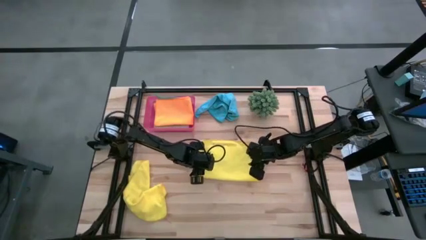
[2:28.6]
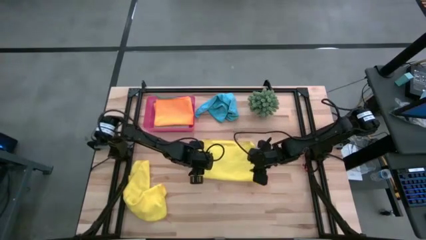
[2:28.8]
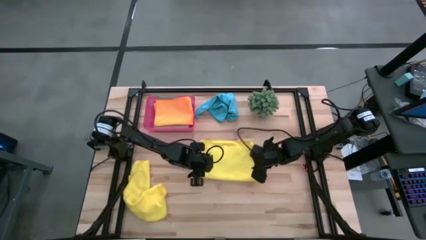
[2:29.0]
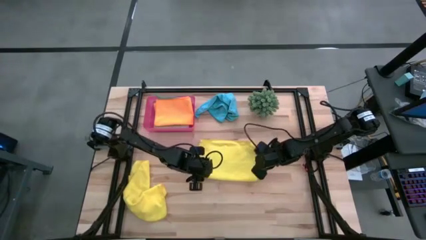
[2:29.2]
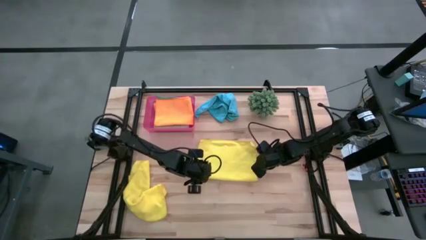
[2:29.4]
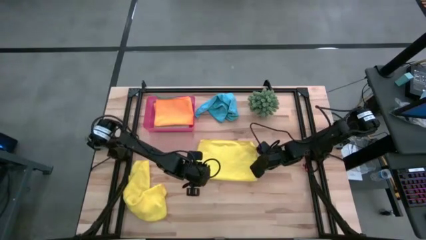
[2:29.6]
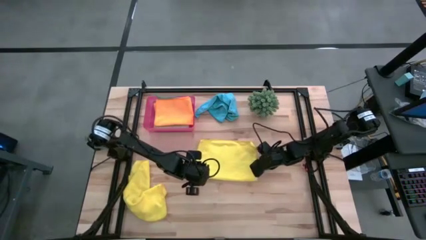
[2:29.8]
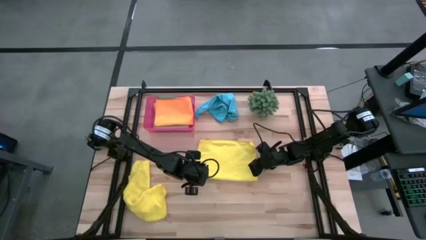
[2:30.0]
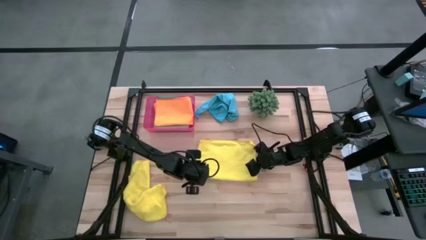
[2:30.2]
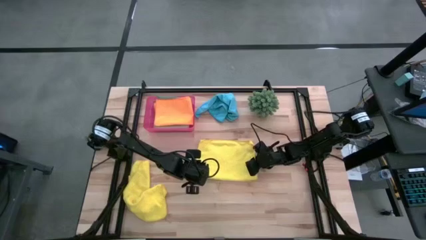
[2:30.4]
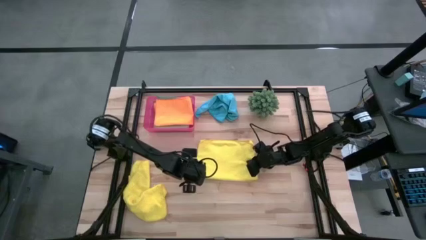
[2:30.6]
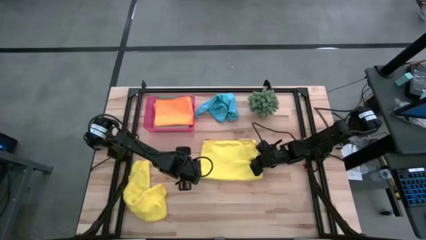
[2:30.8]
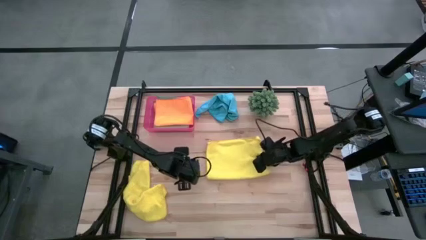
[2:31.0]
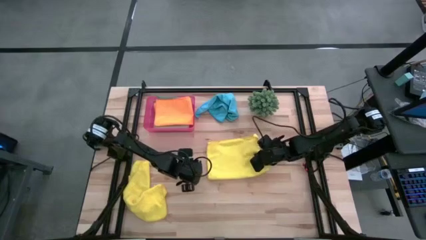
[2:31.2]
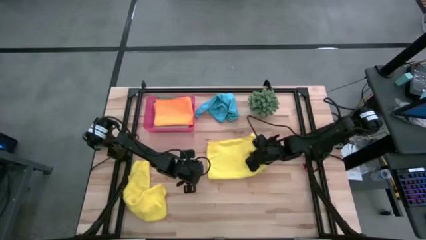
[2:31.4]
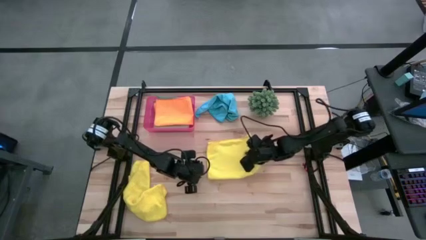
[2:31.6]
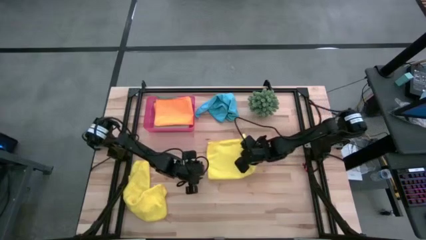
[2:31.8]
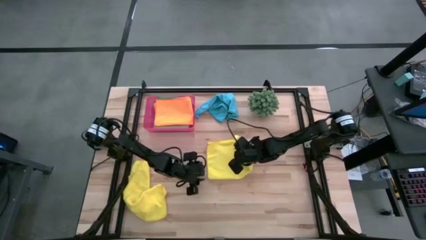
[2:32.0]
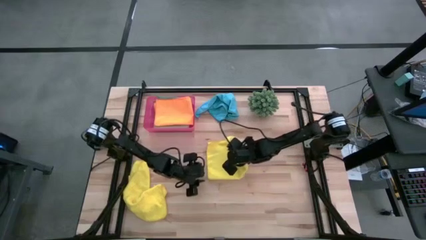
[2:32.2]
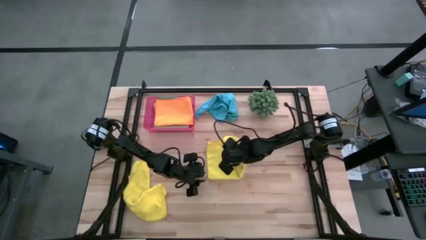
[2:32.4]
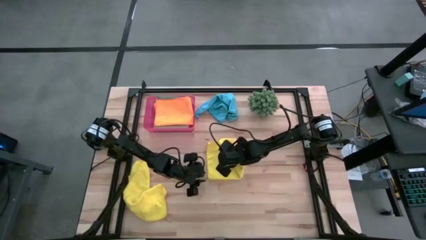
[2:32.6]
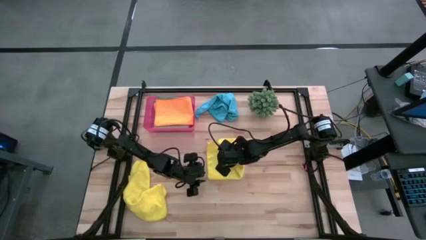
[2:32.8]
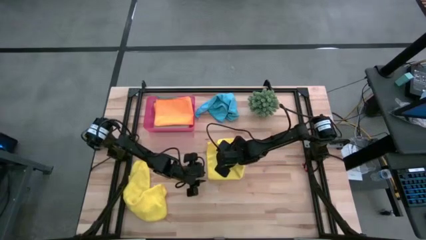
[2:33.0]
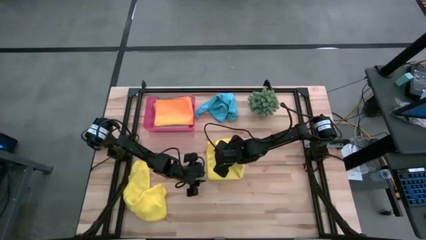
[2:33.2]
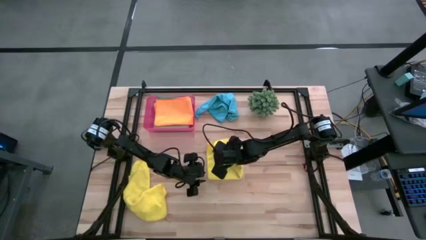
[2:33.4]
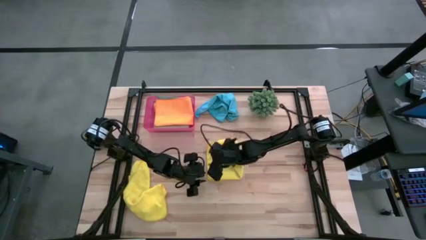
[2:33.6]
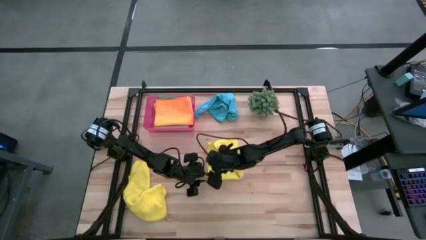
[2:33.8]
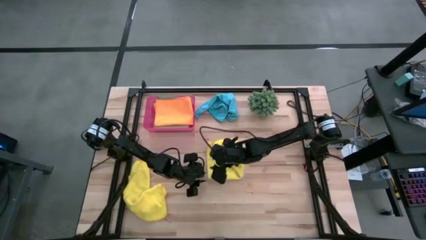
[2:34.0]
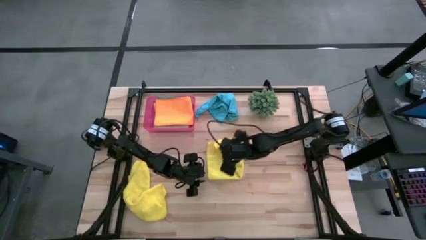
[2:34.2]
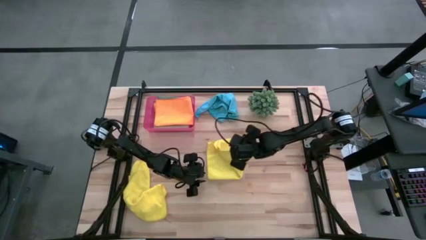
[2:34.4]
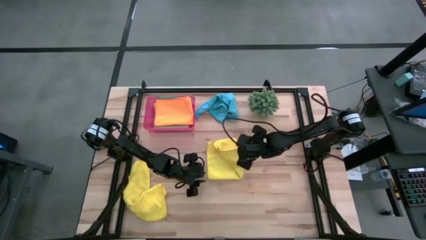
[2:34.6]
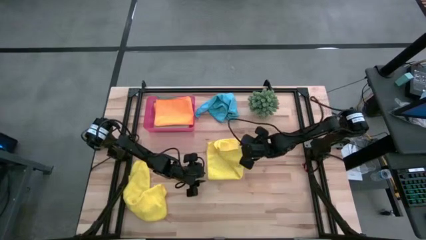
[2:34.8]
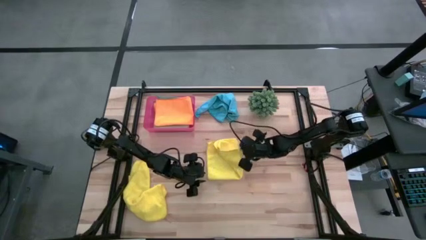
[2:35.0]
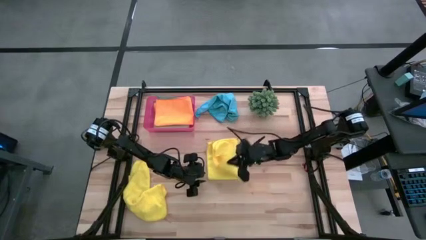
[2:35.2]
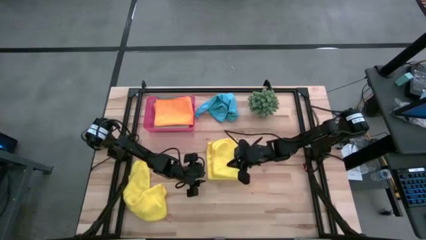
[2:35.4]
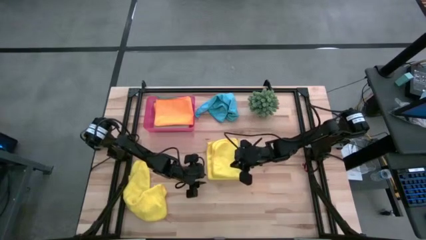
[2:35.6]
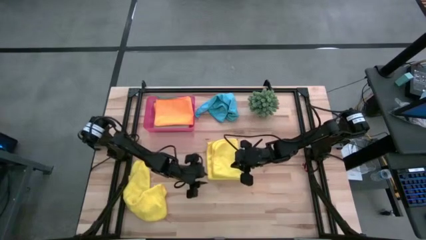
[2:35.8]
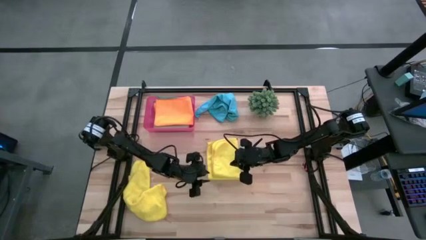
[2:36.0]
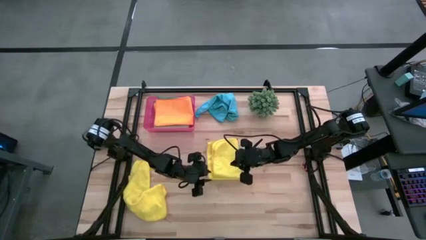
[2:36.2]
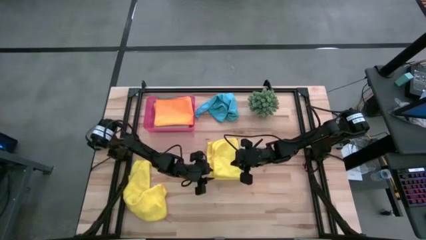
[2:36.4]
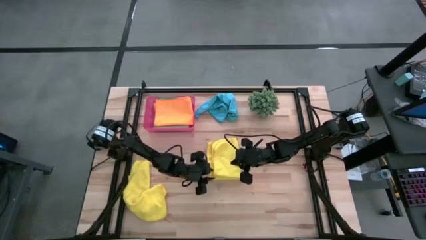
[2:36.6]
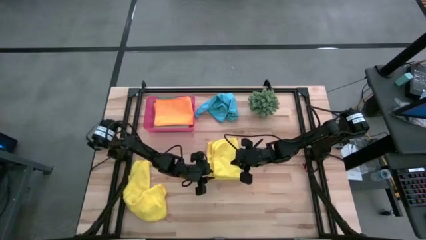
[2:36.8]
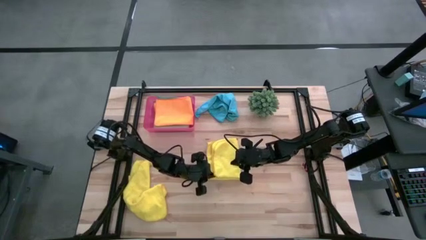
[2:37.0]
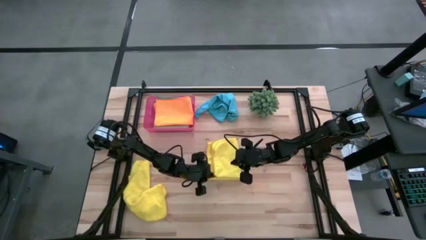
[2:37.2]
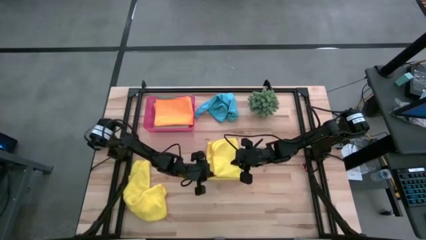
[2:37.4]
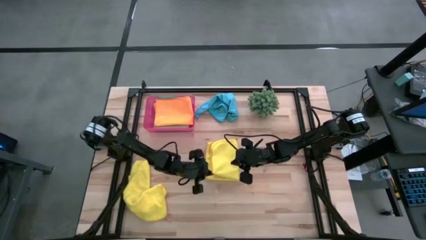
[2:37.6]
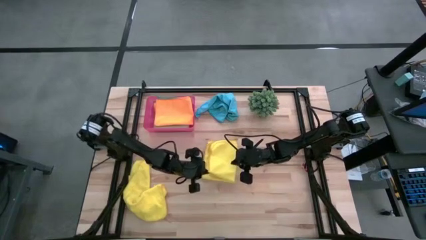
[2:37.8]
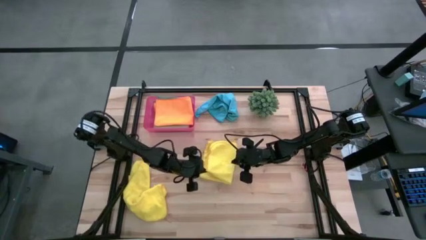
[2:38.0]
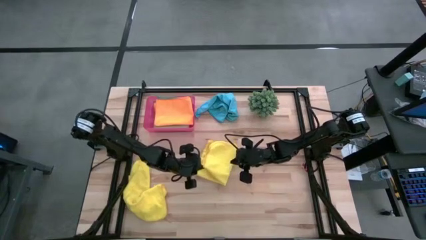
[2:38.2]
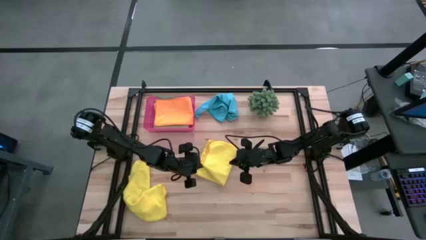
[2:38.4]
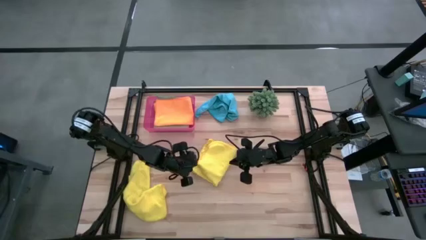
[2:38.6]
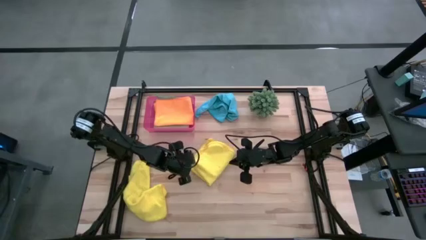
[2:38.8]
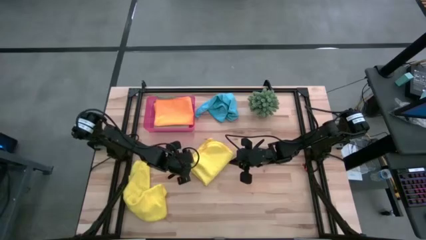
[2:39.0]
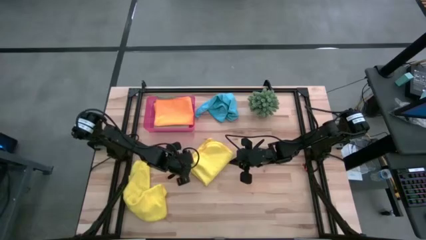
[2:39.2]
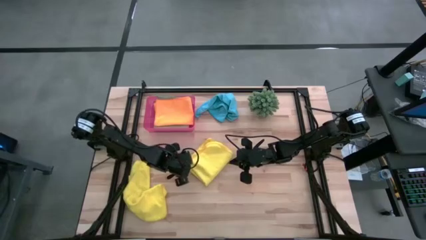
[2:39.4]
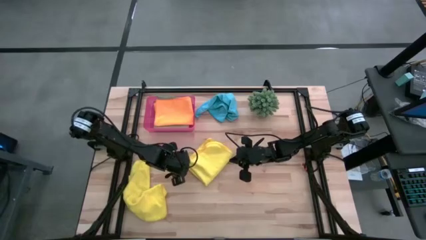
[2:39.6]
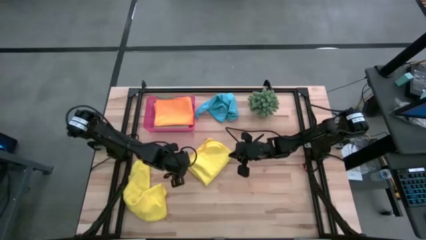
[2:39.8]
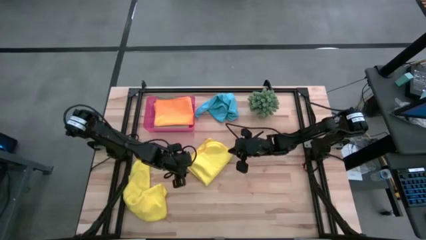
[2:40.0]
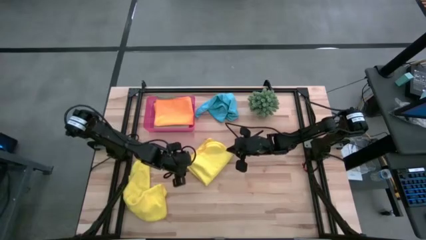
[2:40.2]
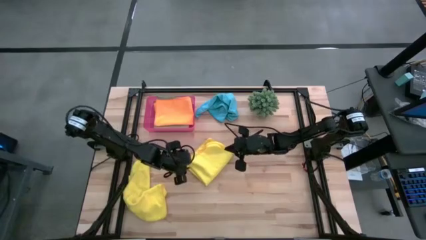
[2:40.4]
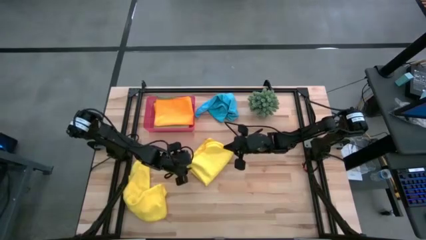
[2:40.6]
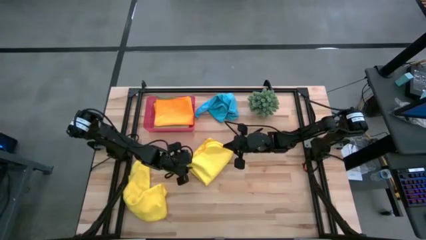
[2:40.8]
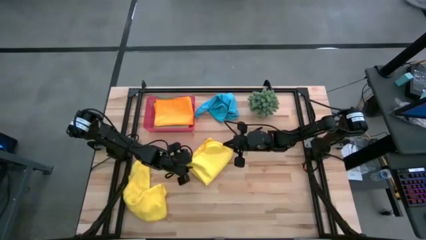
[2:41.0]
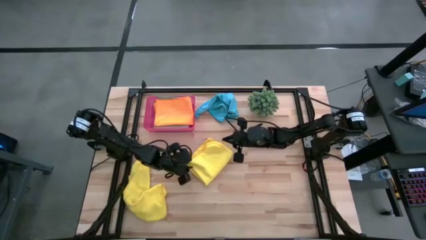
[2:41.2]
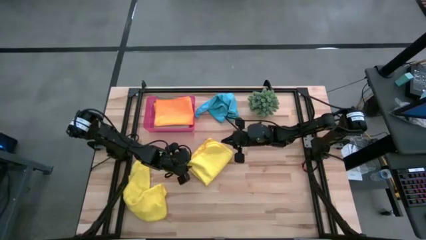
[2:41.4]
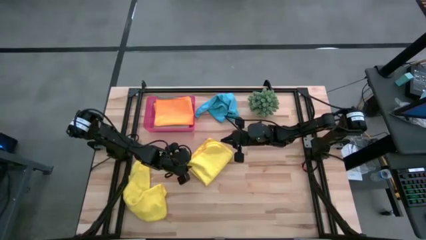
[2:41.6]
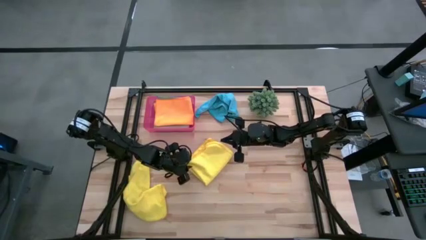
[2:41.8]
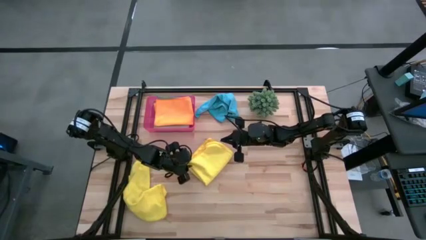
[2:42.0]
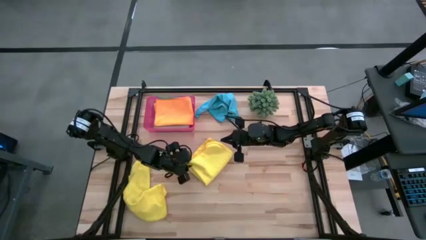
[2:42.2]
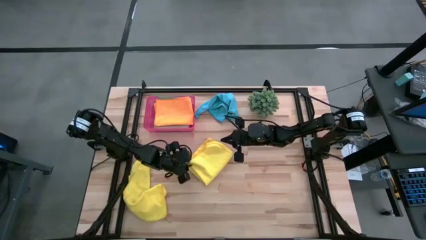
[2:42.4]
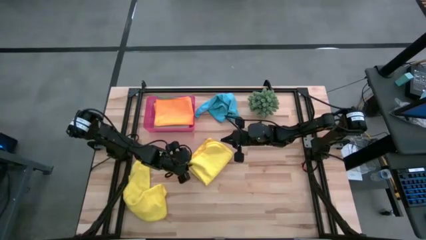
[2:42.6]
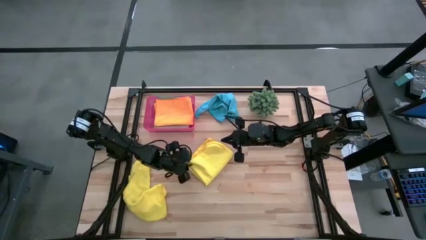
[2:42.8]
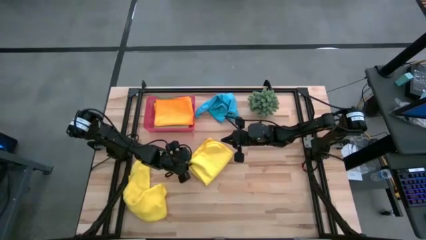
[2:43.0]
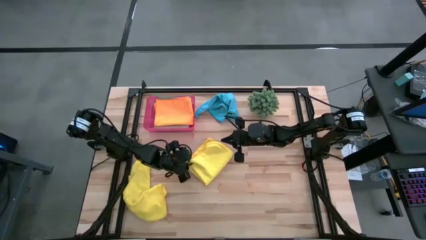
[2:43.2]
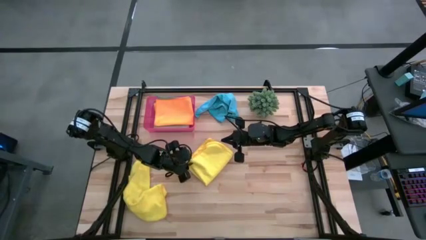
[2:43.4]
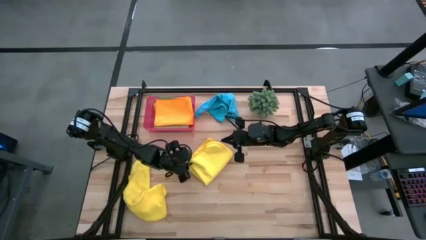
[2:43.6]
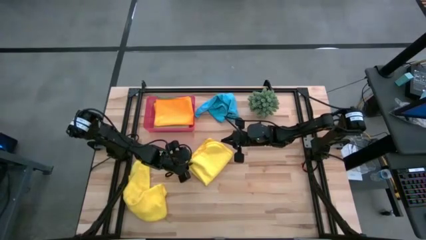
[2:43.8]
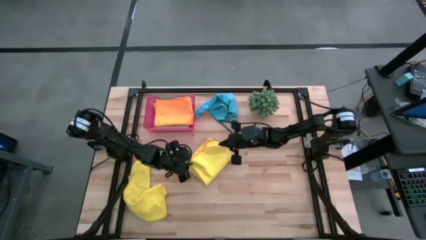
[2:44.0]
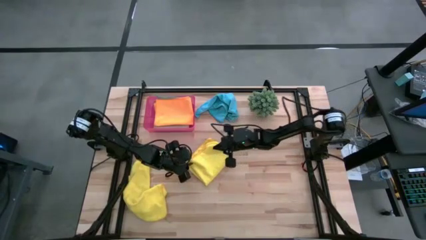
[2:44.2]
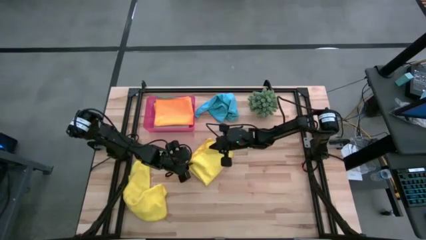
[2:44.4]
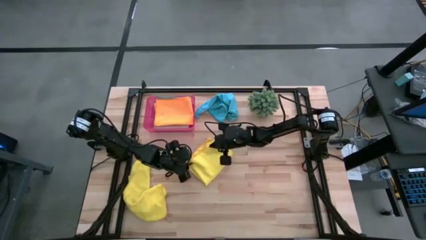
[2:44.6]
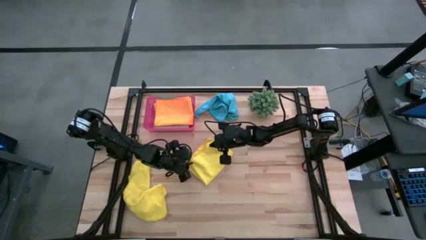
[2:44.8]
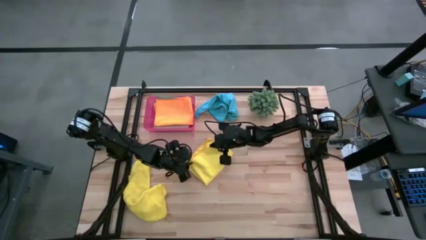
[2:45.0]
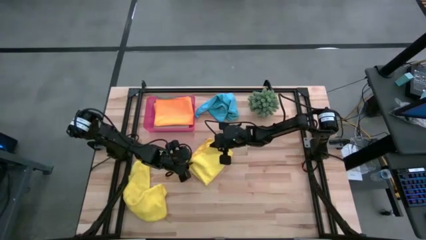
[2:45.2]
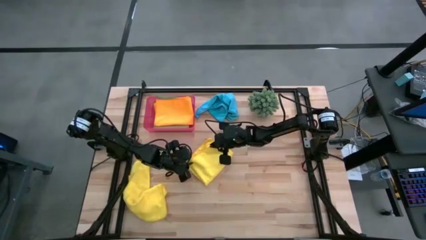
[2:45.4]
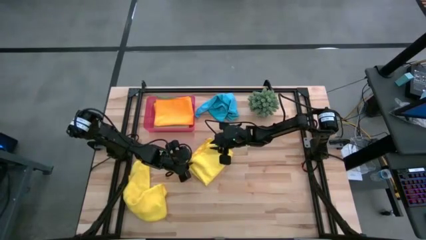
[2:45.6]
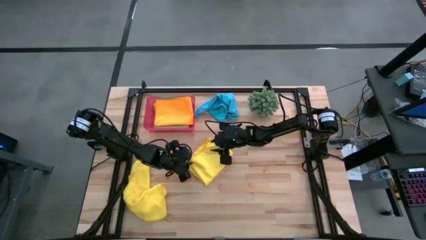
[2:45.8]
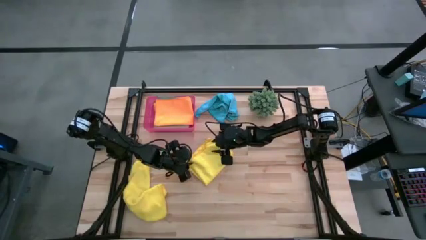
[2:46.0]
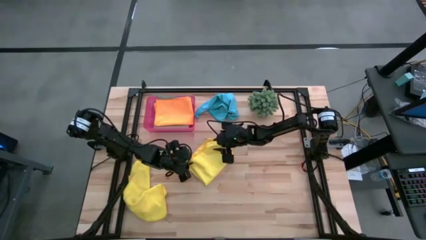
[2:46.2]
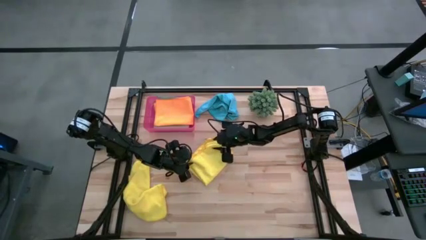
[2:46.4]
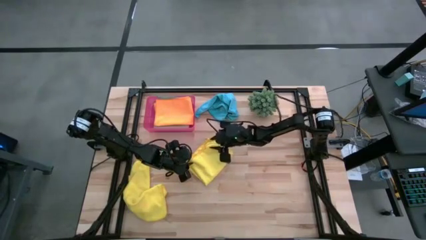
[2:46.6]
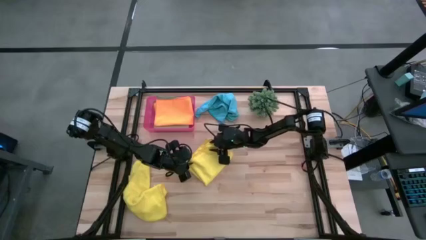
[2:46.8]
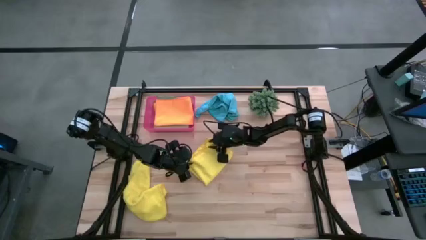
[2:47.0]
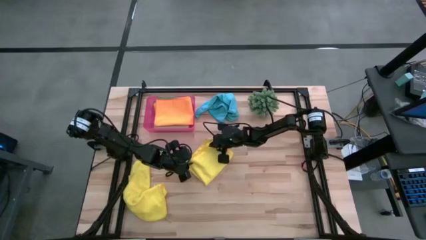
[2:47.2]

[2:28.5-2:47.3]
Task: Fold microfiber towels
Fold the right yellow towel
